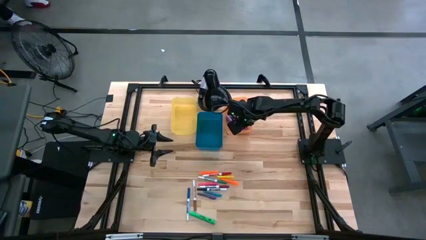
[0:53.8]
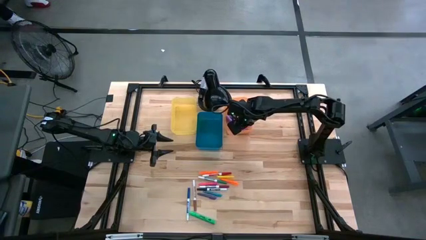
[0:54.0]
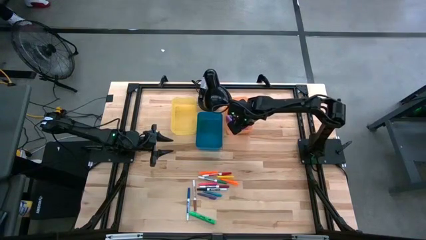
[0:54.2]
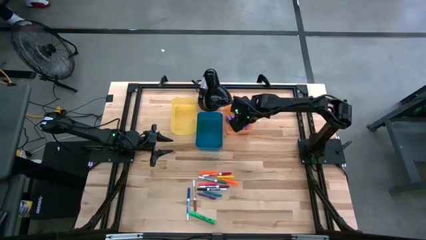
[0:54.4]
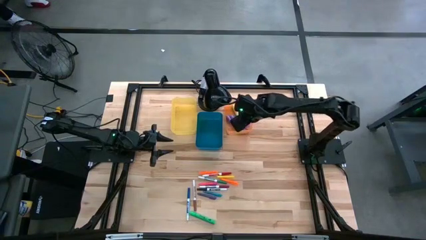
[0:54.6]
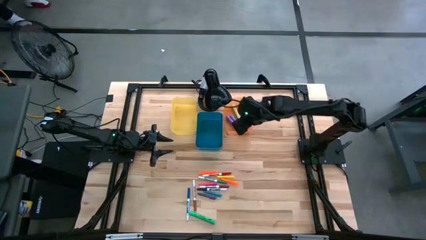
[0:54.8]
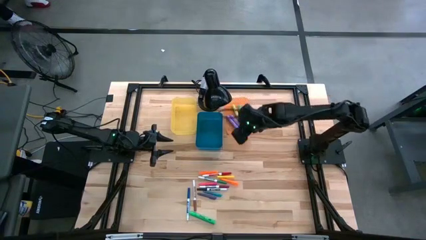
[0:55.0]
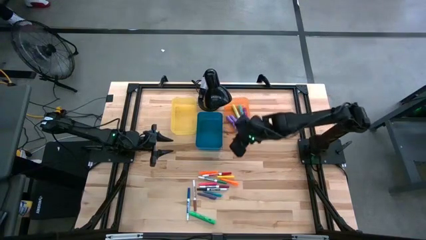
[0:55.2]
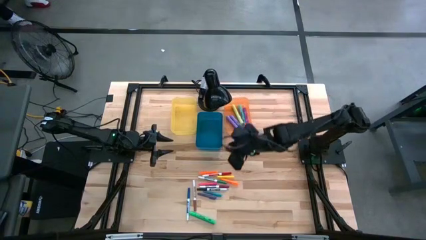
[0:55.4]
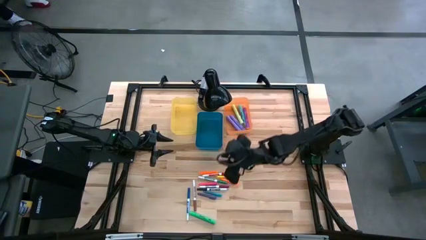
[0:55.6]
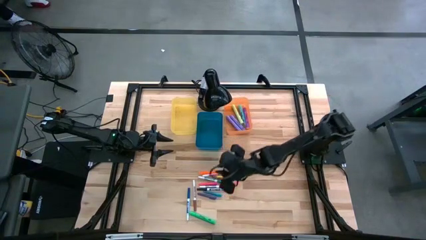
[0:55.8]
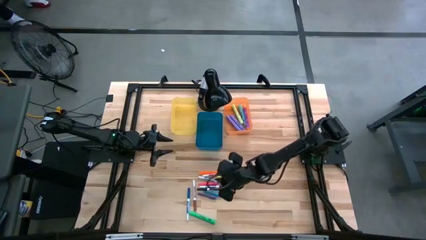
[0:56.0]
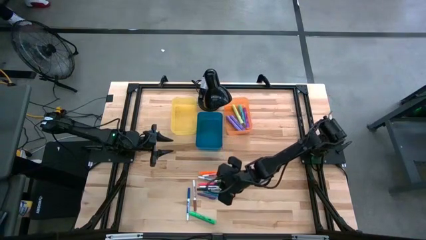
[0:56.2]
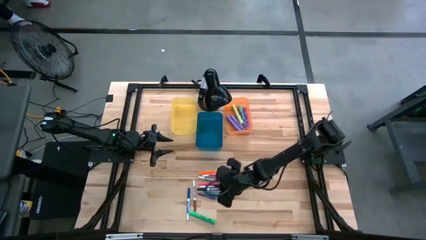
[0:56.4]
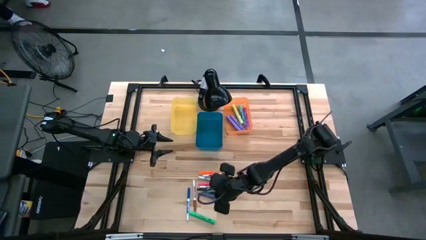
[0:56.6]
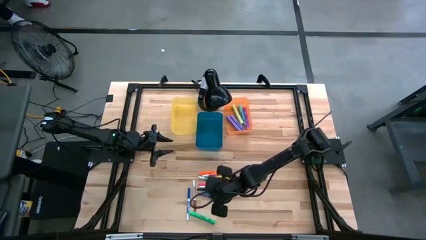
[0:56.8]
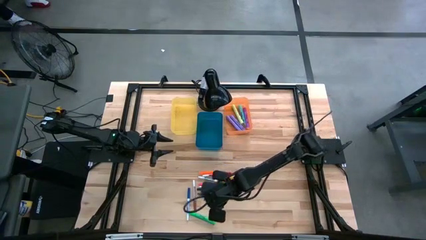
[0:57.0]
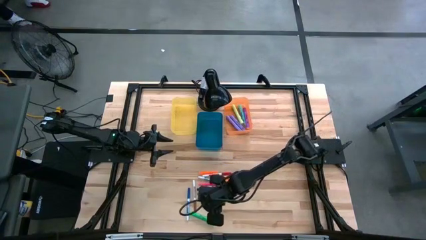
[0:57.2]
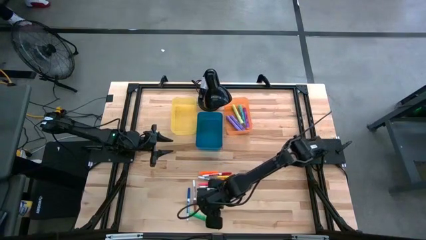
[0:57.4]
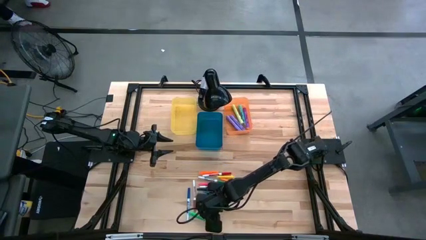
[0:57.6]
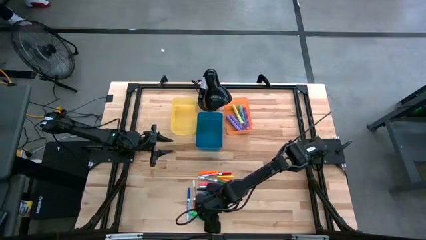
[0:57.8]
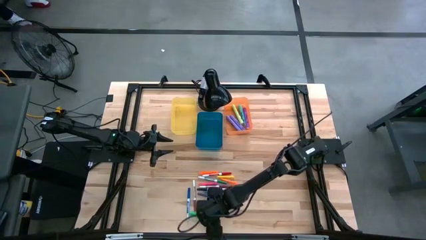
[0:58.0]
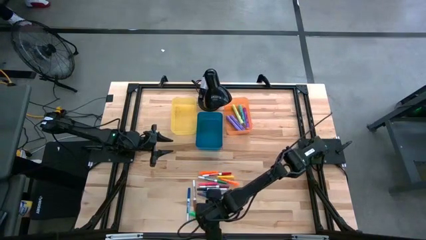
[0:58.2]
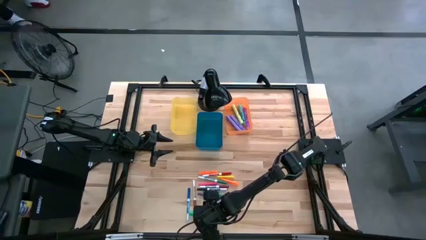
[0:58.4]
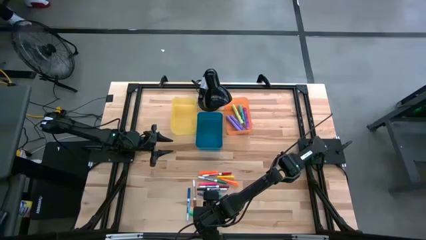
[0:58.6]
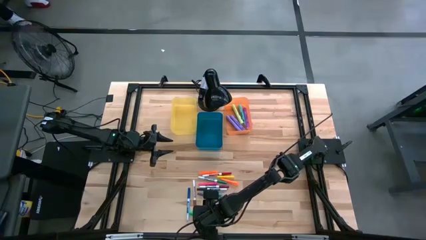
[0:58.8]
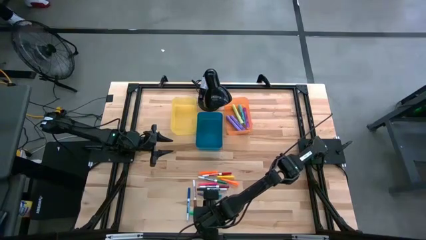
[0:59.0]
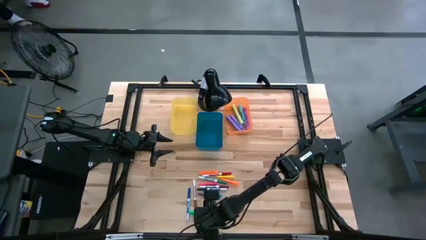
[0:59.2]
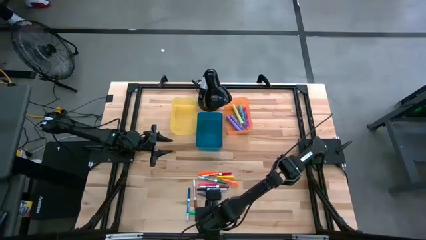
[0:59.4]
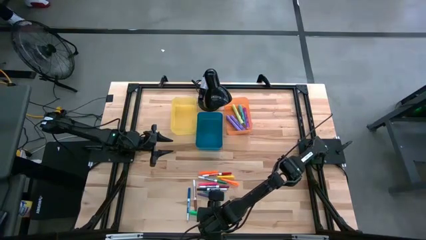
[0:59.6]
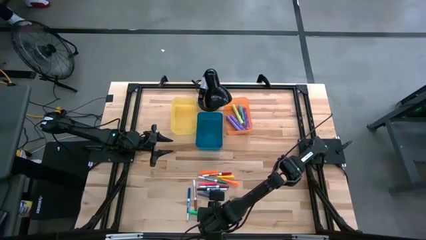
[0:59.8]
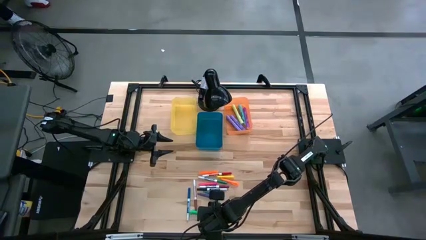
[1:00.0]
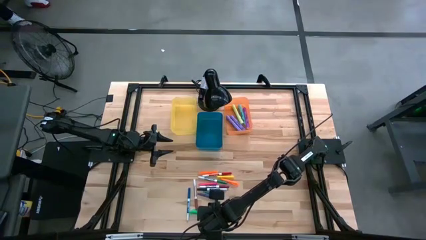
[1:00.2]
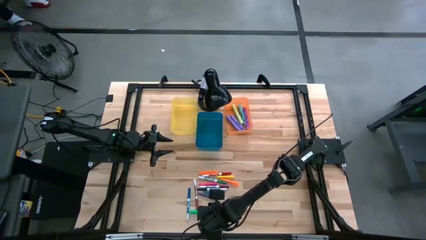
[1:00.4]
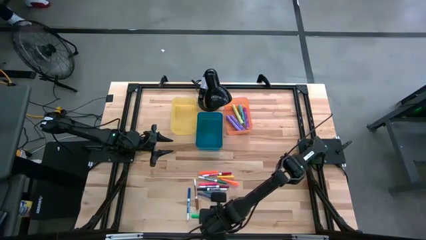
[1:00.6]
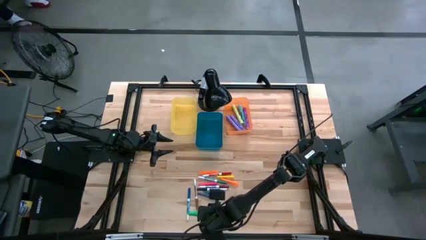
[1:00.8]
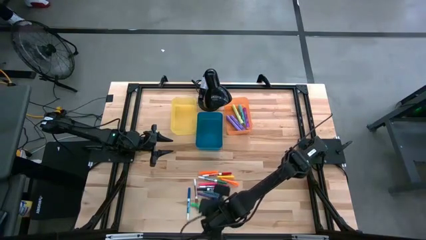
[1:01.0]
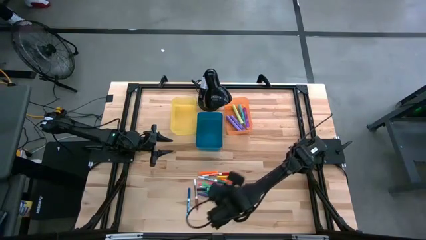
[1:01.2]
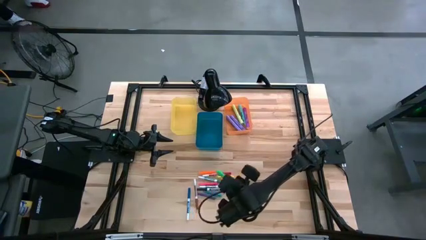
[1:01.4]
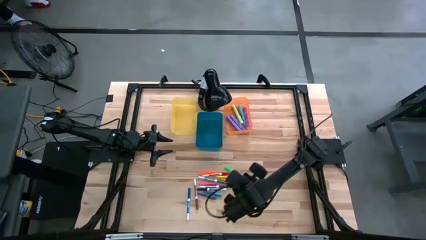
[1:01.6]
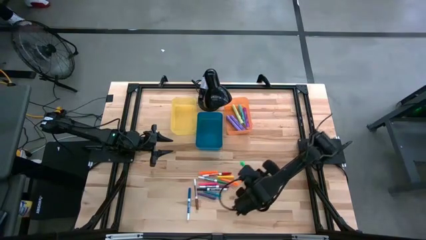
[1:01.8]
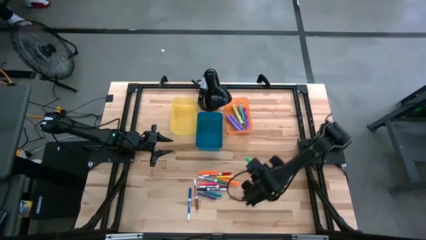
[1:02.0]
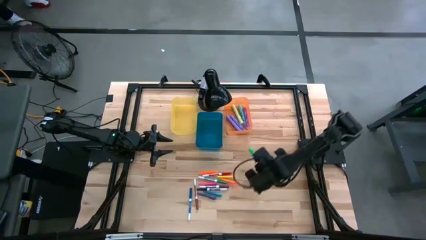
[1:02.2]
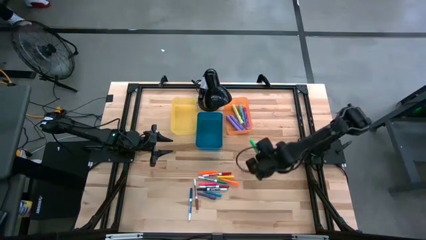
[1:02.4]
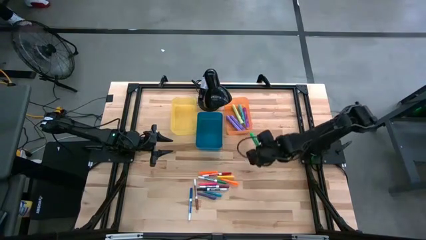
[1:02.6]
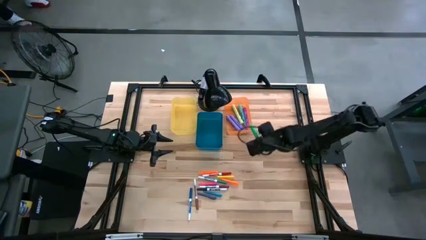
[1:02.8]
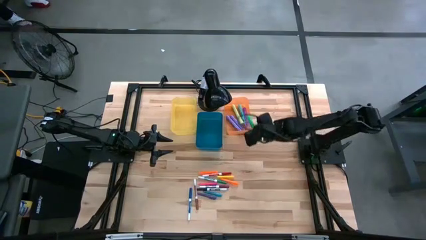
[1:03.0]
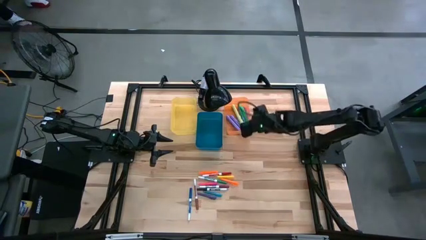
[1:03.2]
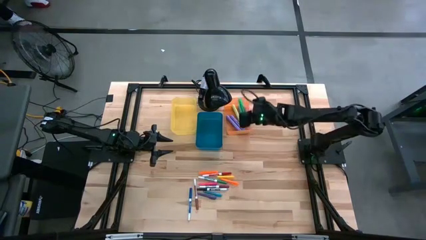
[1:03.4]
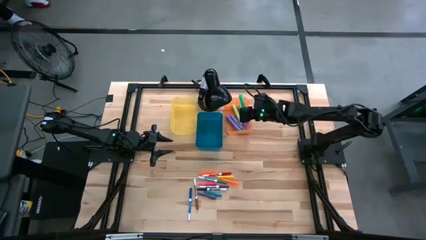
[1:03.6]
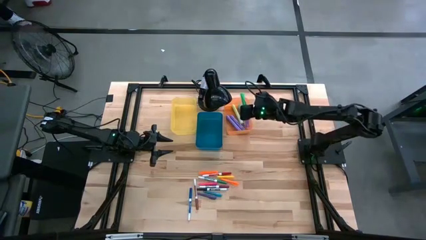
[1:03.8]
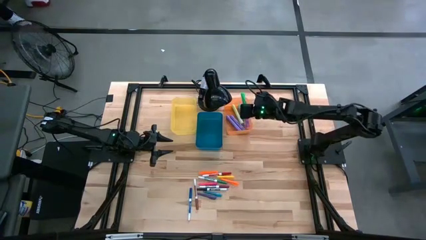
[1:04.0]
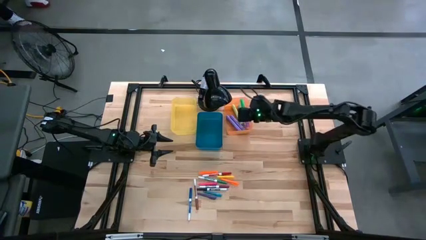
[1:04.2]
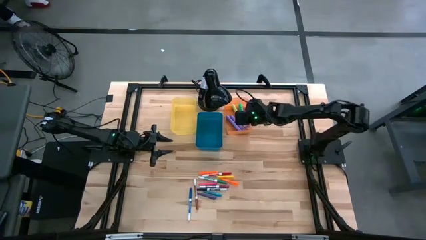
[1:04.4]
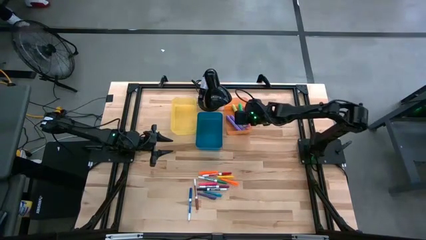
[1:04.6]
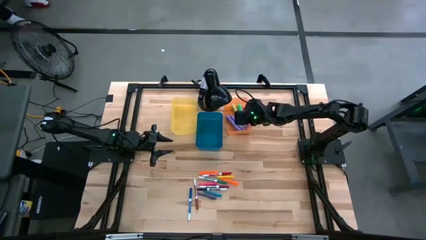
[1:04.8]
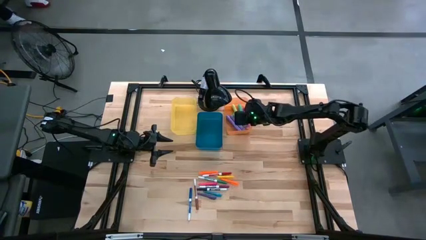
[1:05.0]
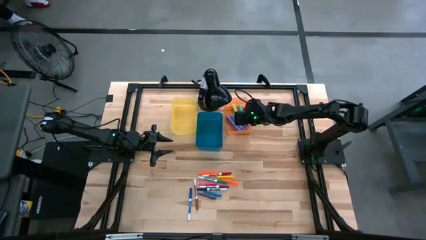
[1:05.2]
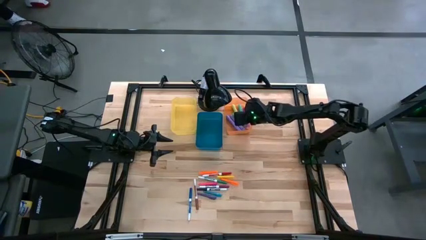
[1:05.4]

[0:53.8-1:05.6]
Task: Pick & Place Markers
Put the green highlighter into the orange bin

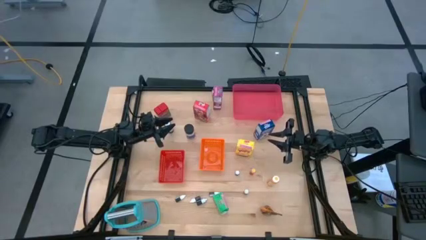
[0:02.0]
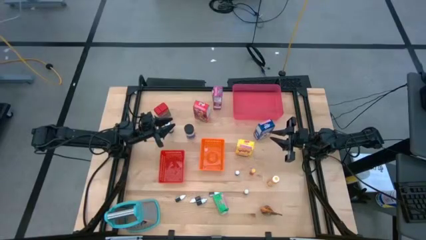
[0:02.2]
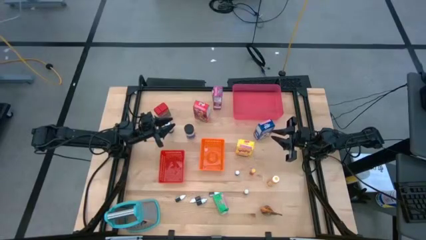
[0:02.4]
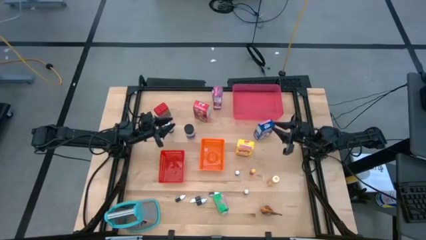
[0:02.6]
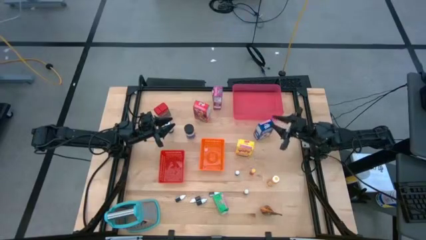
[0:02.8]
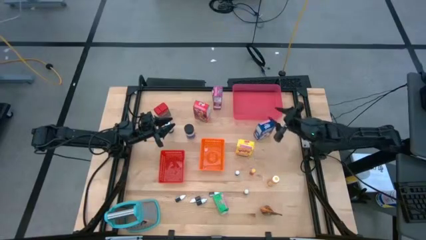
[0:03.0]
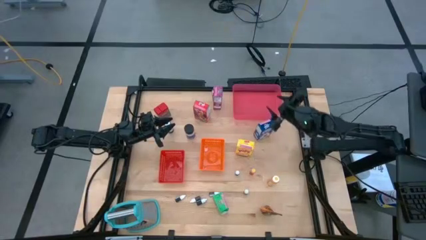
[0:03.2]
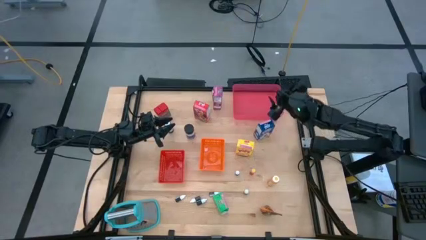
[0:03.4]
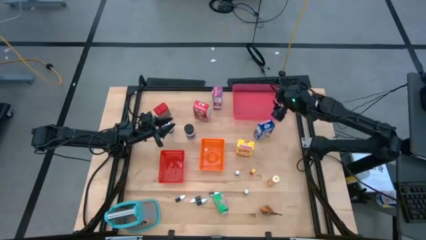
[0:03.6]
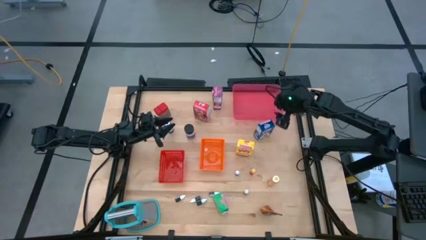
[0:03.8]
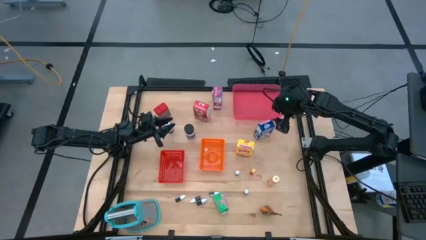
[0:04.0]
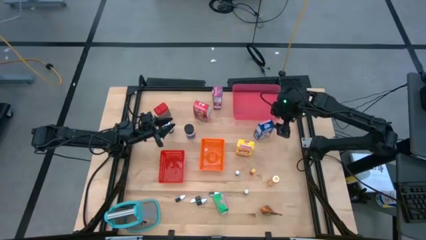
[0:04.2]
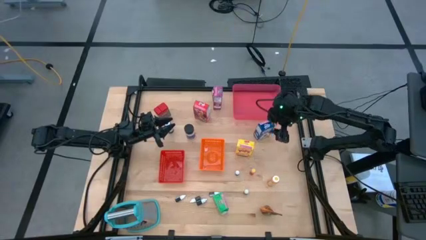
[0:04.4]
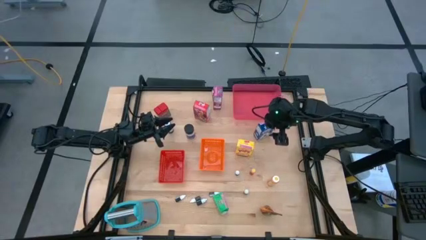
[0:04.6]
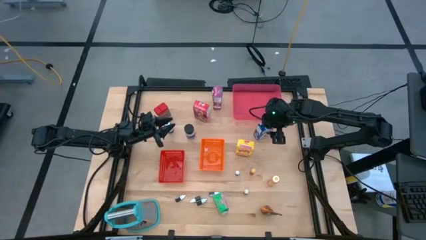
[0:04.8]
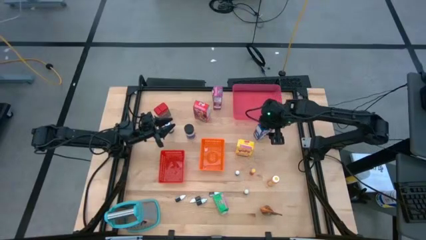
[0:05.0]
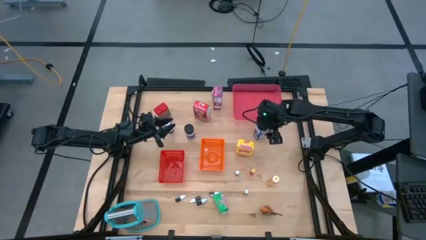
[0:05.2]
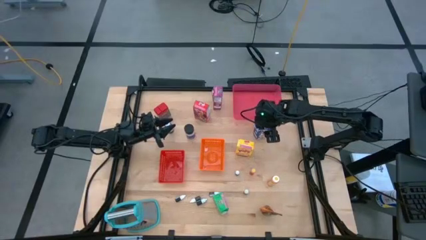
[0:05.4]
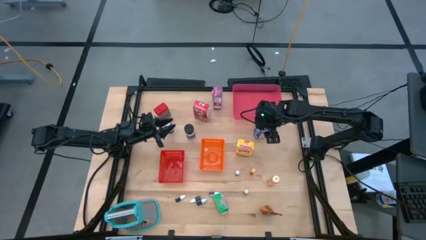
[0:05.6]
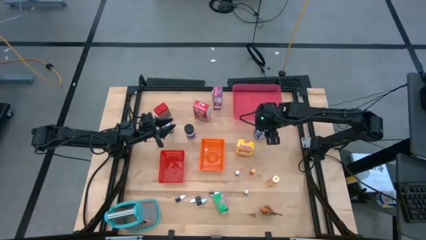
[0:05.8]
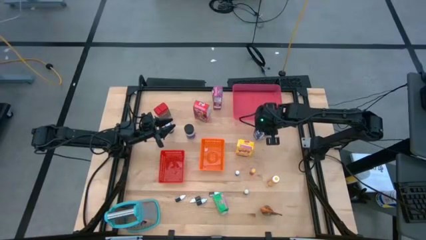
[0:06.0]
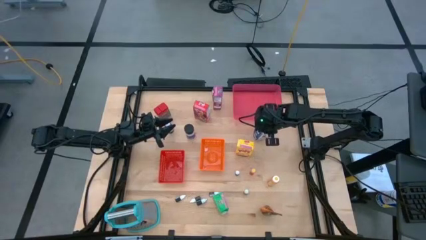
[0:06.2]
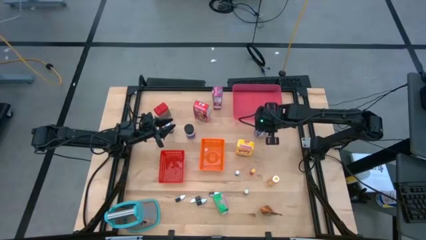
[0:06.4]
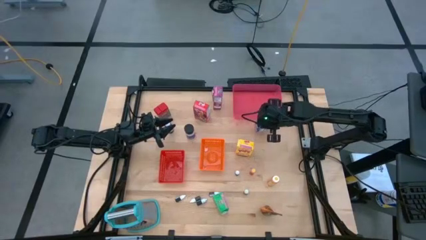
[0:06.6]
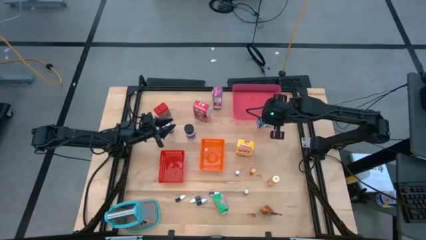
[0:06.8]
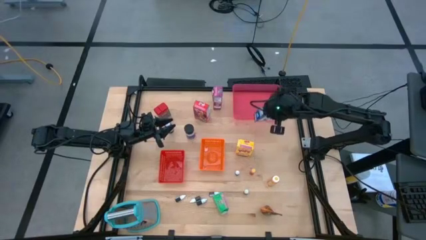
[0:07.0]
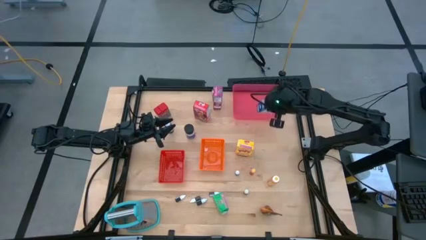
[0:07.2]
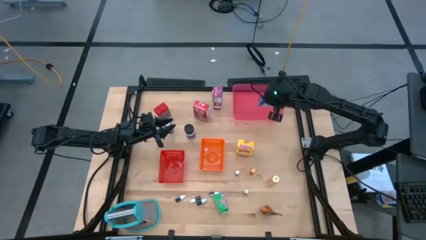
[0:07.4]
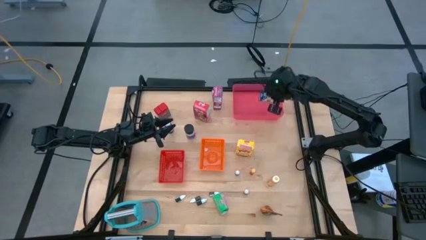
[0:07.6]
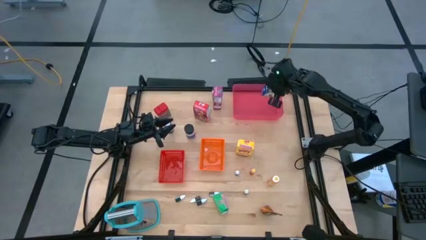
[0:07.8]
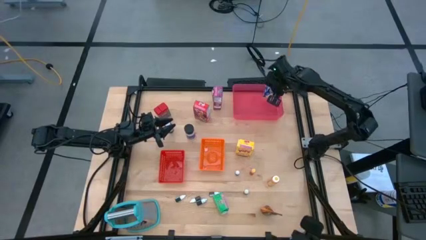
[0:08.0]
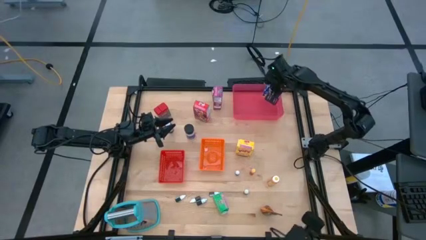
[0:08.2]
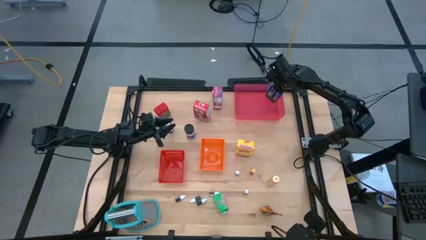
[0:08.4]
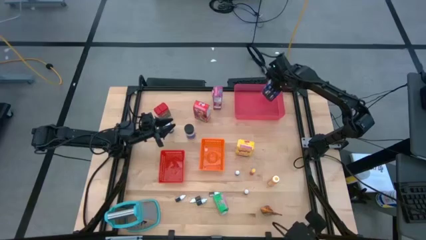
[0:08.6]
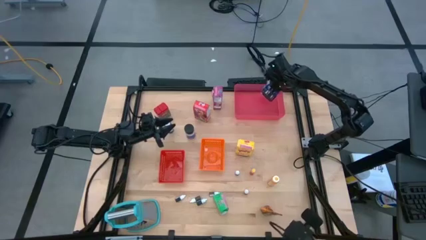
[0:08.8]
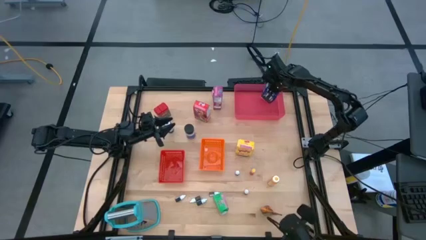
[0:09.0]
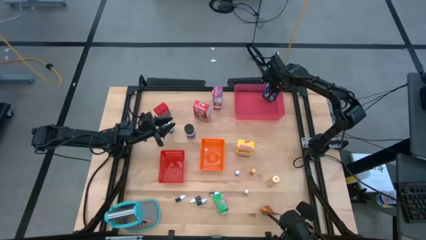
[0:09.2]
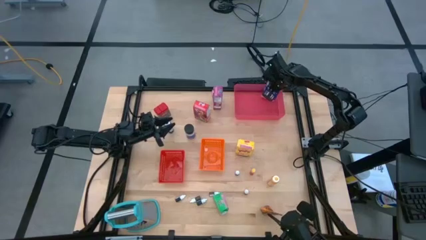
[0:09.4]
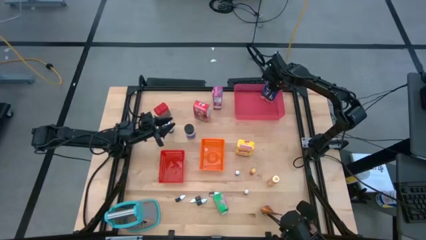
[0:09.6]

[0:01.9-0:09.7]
Task: Pick & Place Kitchen Items
Put the blue cereal box into the light red bin
